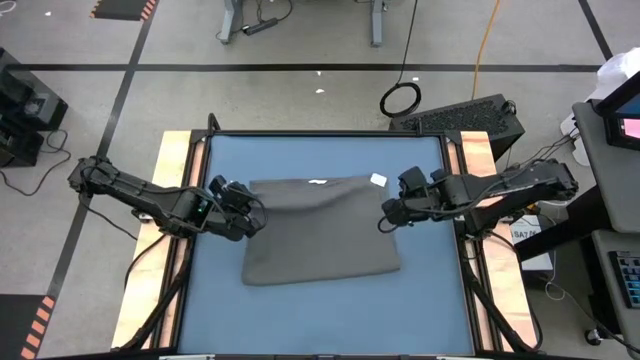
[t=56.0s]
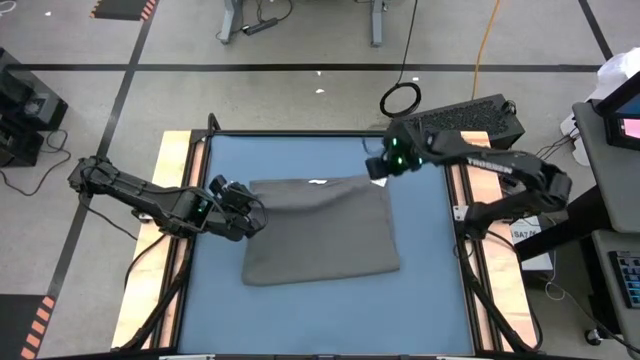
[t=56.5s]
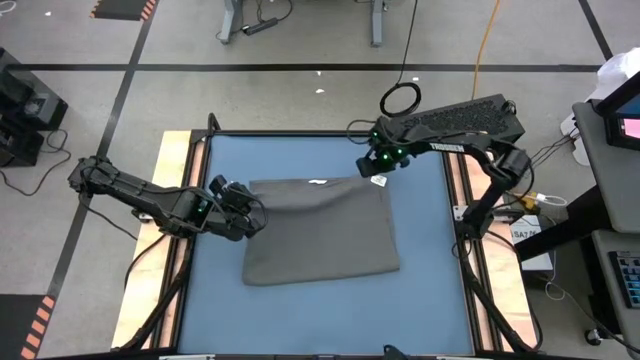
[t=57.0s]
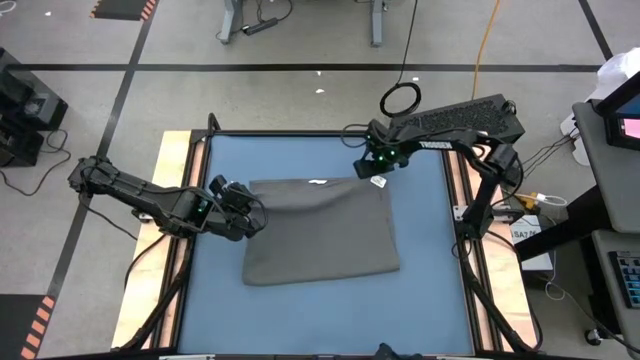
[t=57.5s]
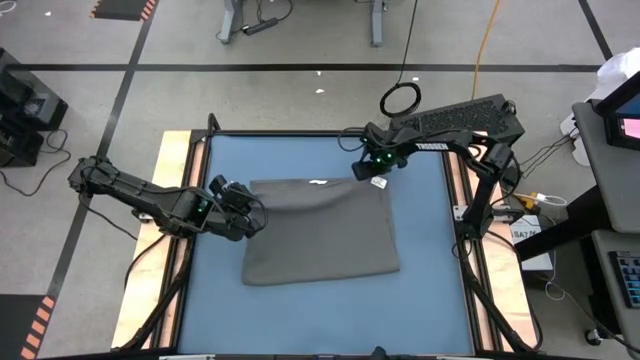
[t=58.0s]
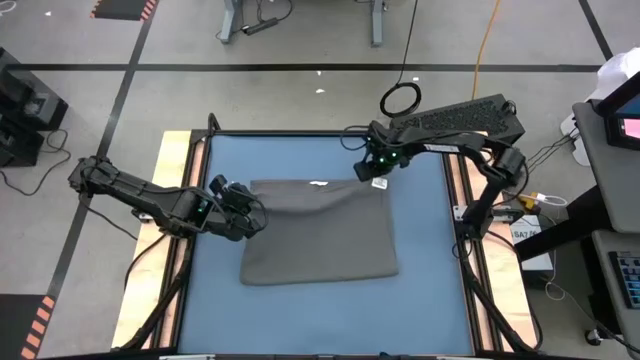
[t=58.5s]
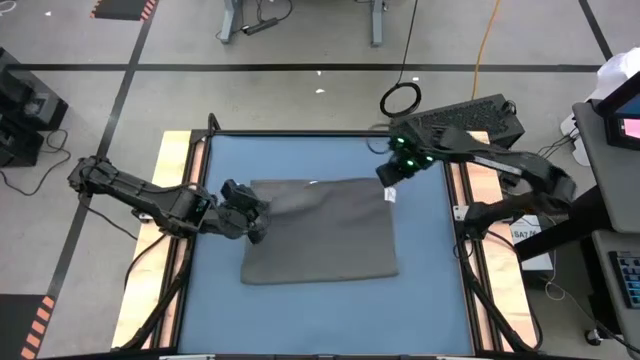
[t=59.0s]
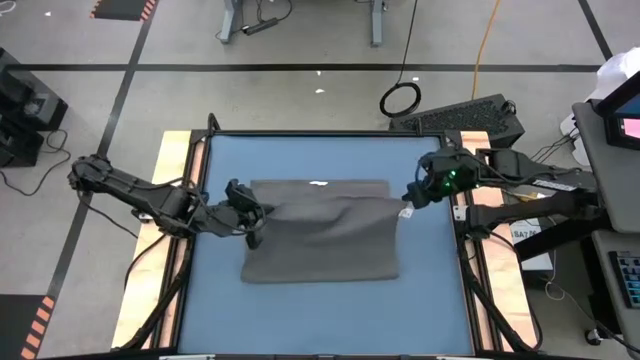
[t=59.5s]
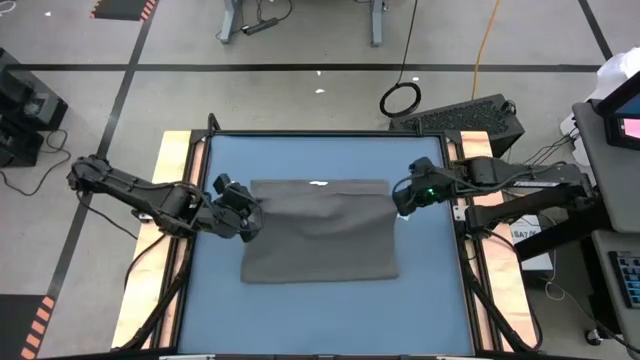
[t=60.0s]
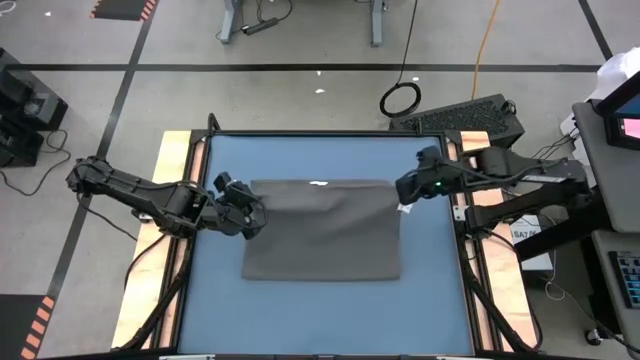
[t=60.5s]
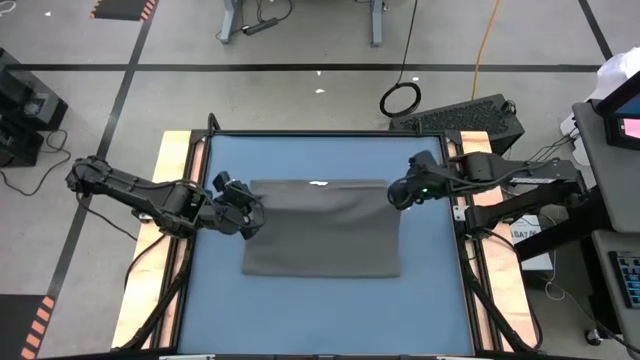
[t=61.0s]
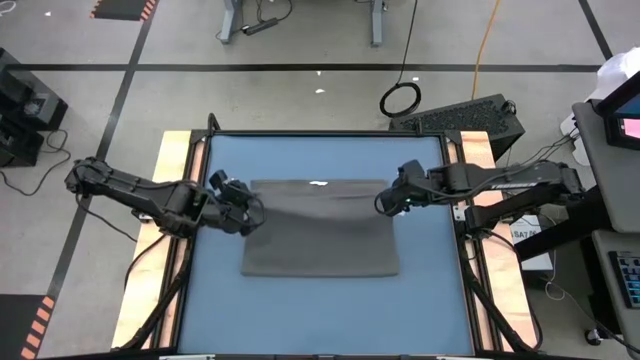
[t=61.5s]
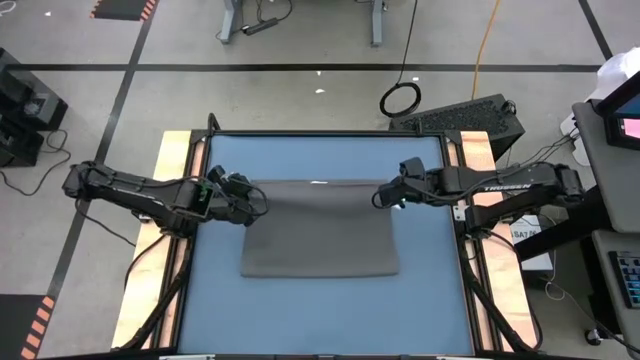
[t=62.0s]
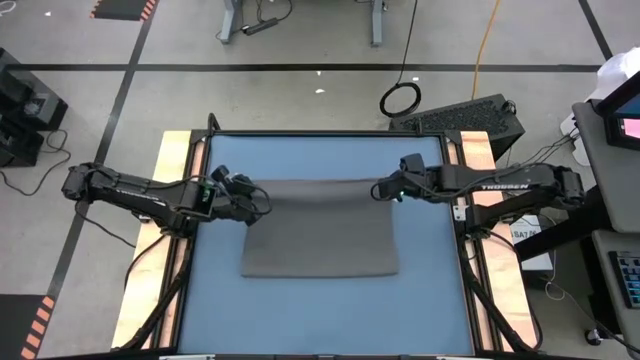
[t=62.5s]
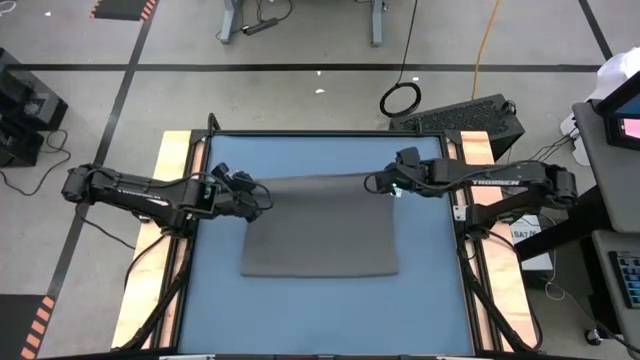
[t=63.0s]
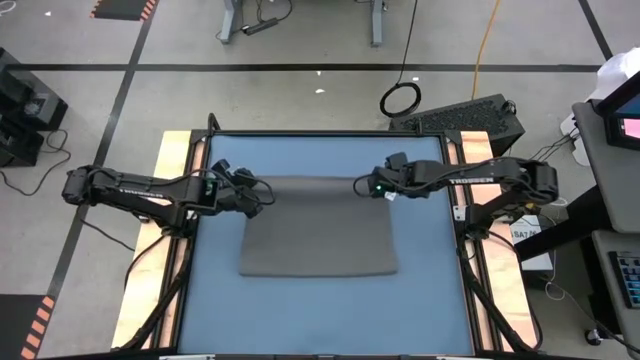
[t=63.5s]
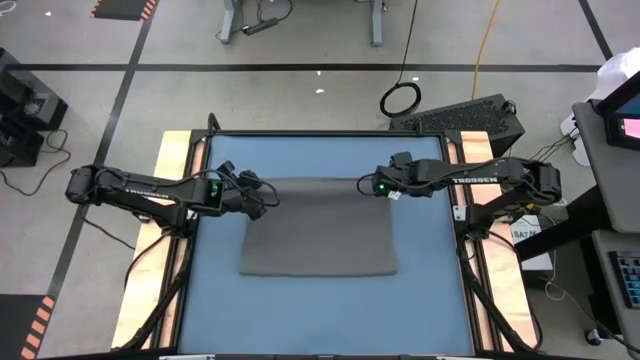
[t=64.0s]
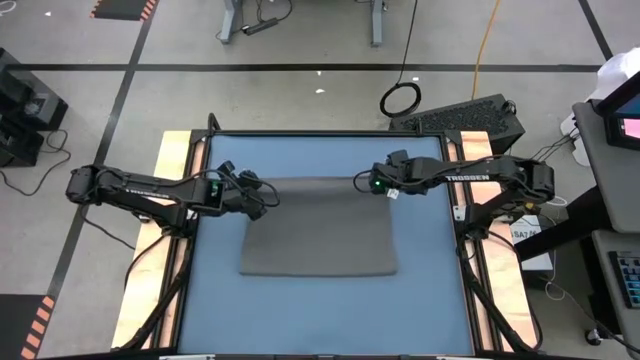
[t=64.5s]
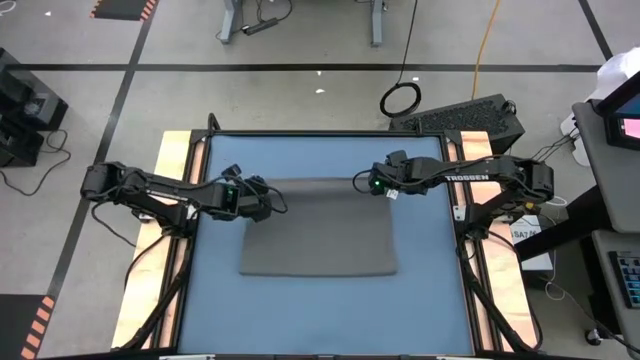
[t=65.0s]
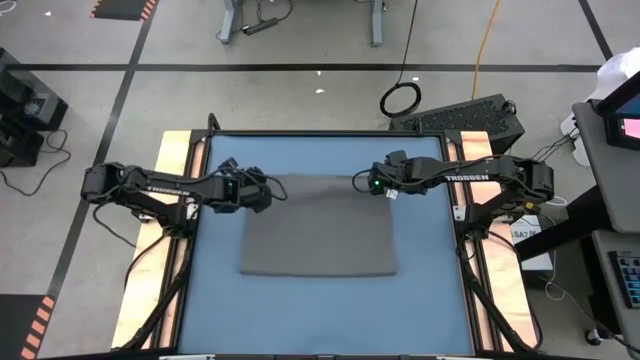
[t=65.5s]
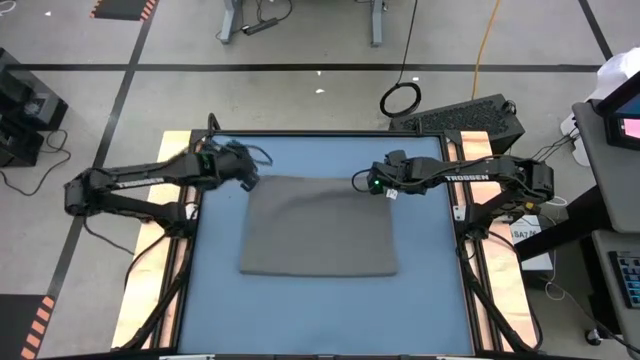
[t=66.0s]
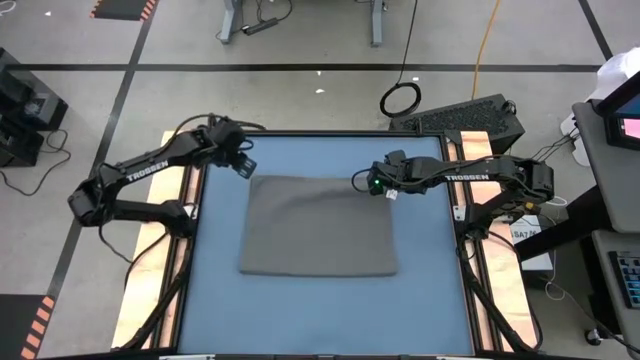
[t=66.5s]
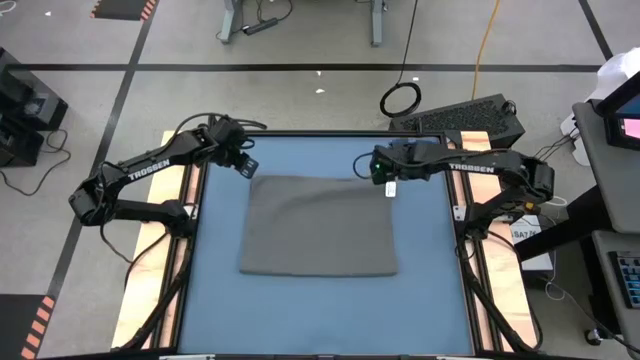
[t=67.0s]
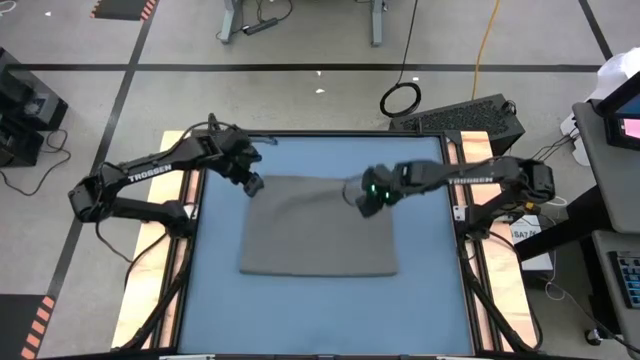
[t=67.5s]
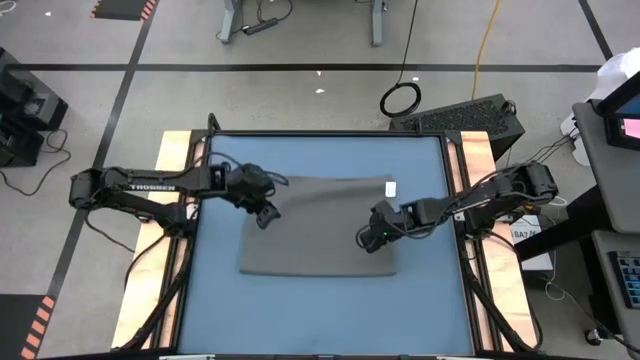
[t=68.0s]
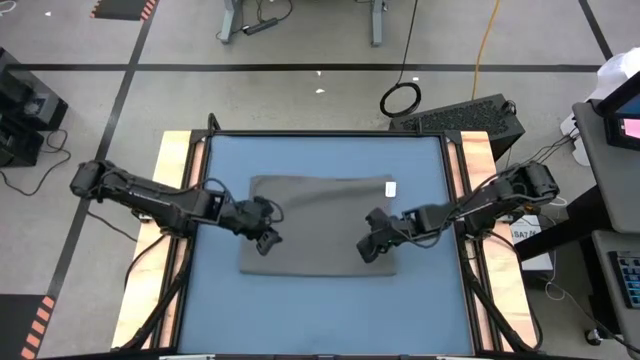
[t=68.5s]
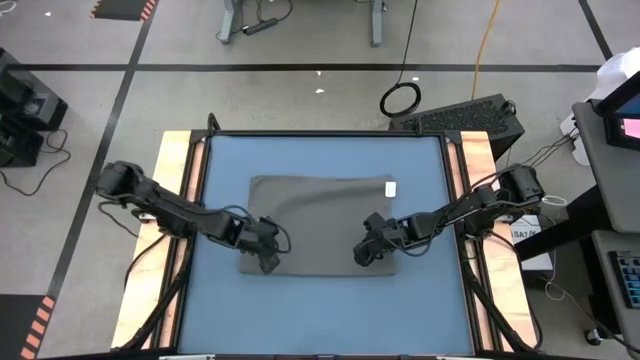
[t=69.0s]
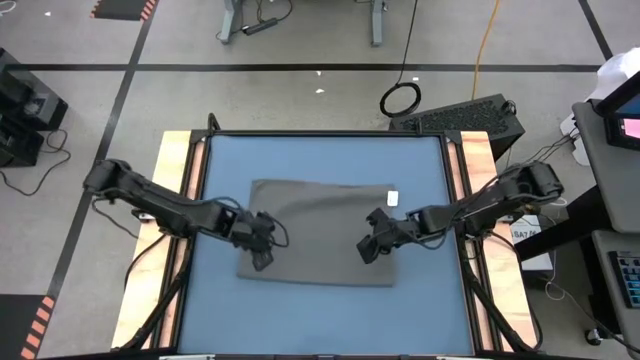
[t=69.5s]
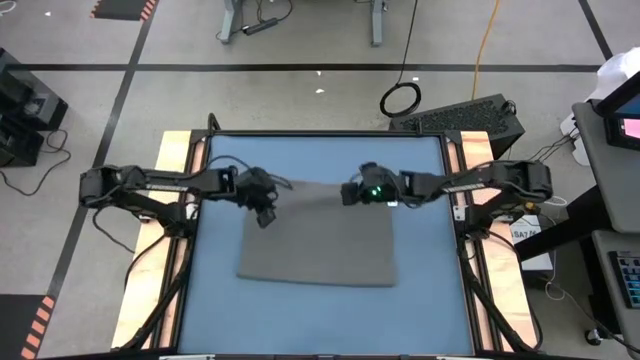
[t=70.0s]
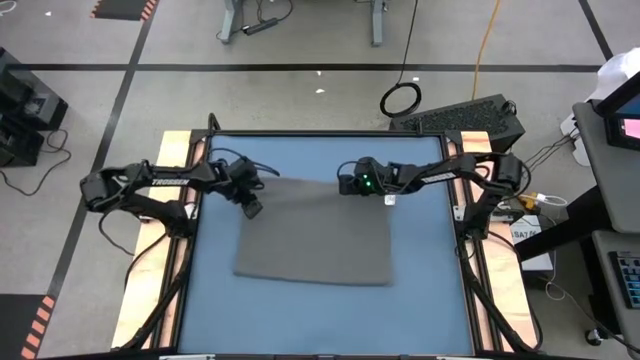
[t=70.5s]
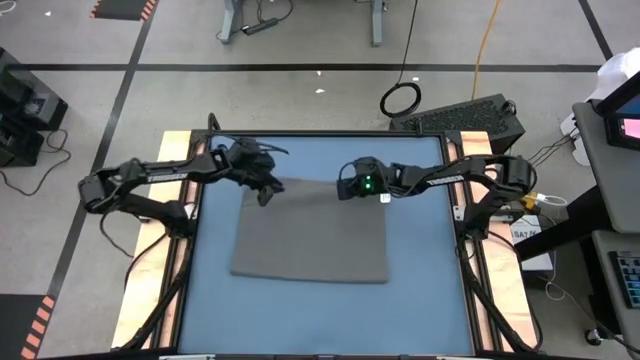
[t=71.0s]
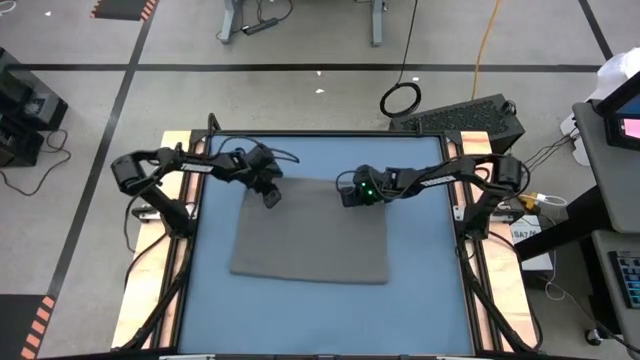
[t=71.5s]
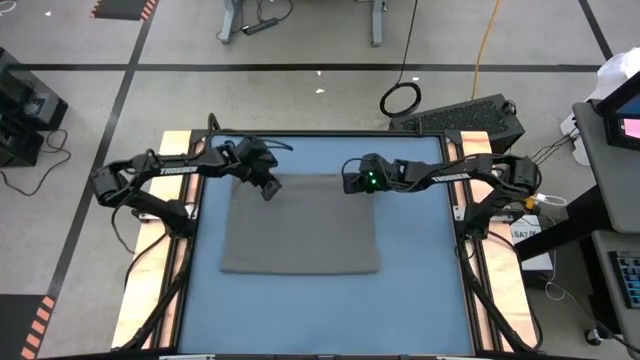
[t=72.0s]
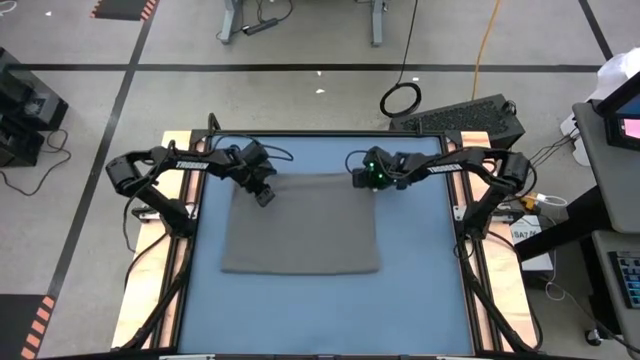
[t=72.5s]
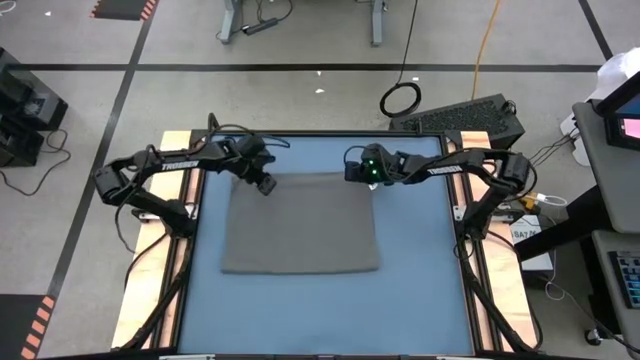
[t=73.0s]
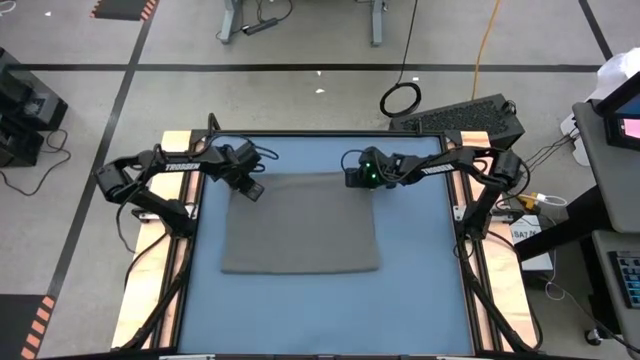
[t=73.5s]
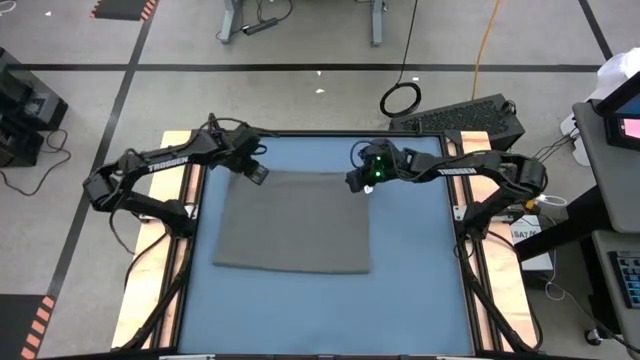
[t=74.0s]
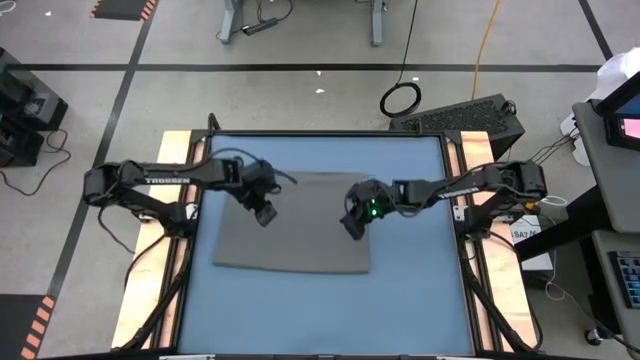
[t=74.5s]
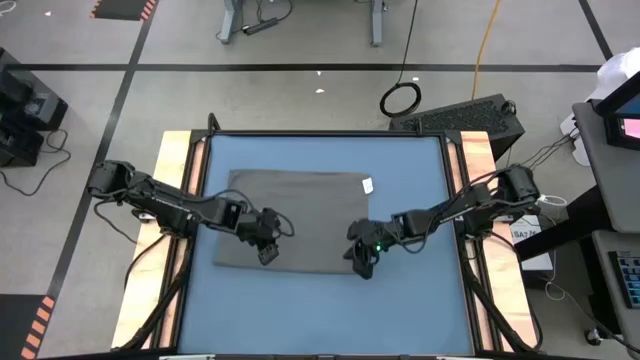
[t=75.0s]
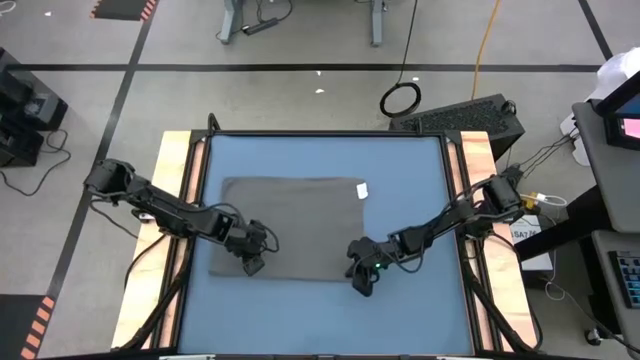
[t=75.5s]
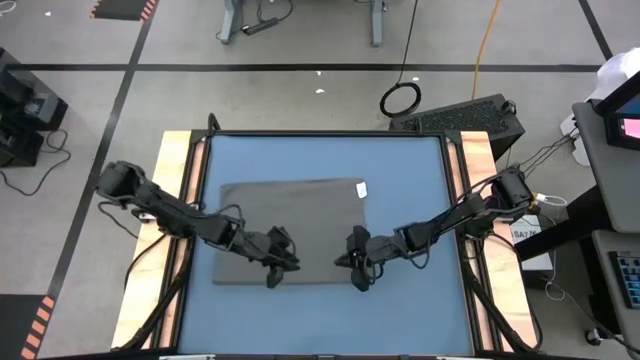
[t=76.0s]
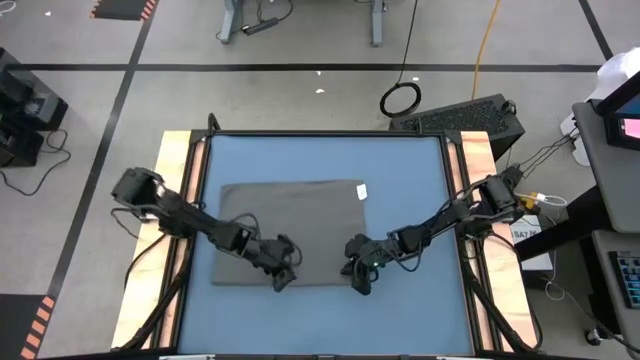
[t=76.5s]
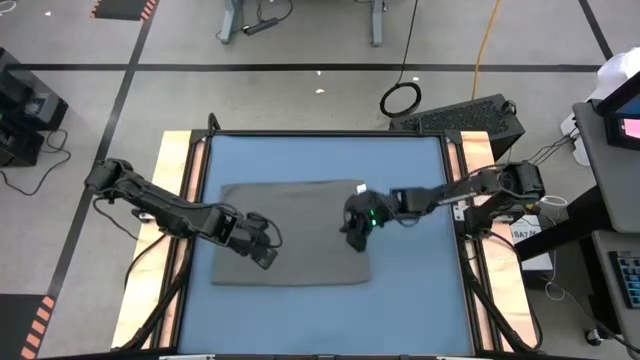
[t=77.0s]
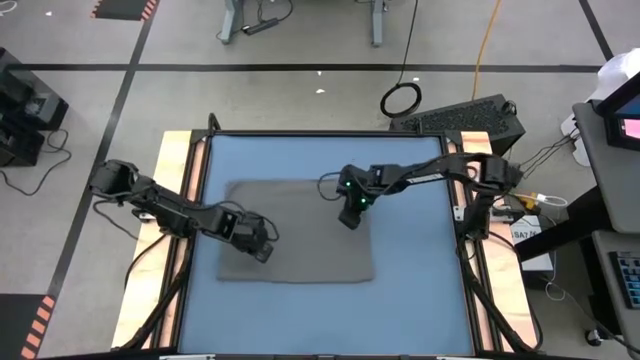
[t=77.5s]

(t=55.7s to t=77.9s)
Task: Roll towel
Roll the gray towel
